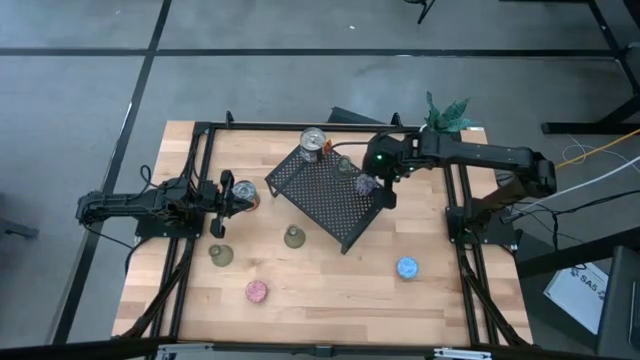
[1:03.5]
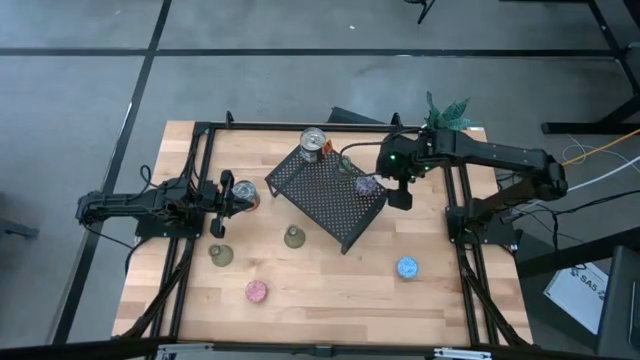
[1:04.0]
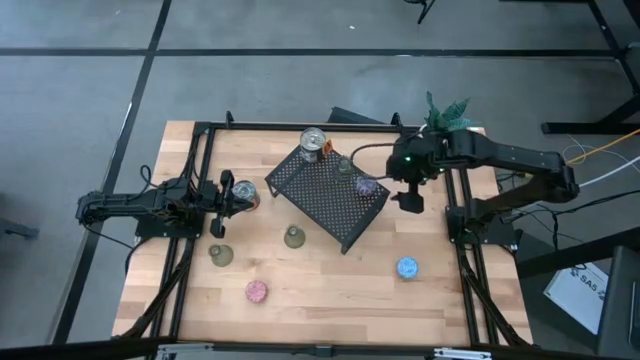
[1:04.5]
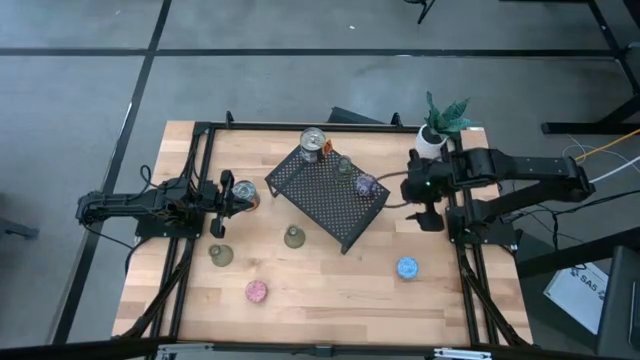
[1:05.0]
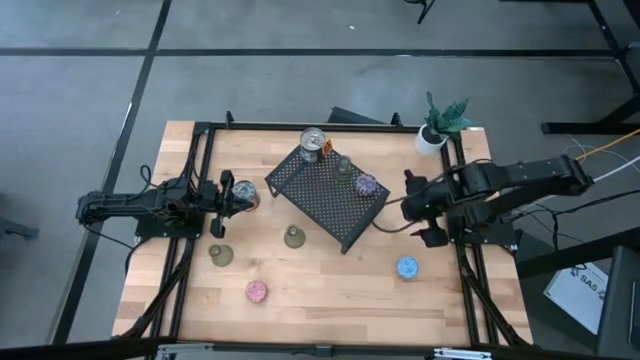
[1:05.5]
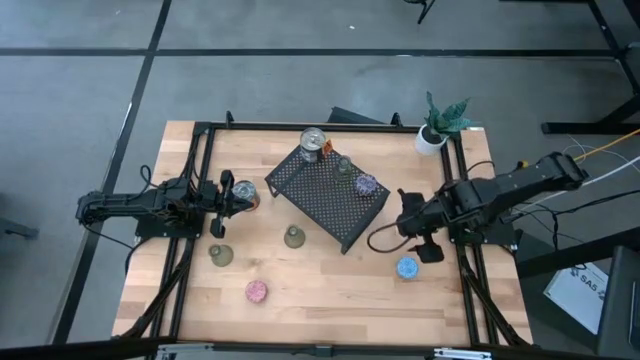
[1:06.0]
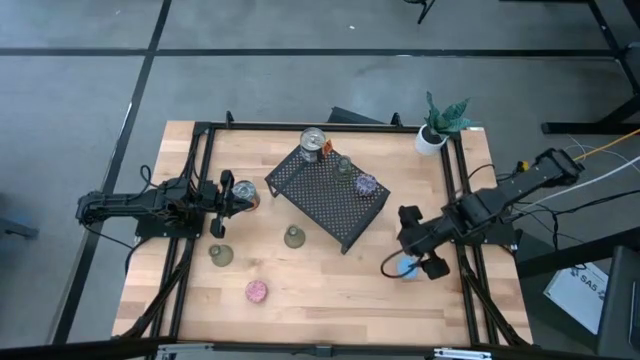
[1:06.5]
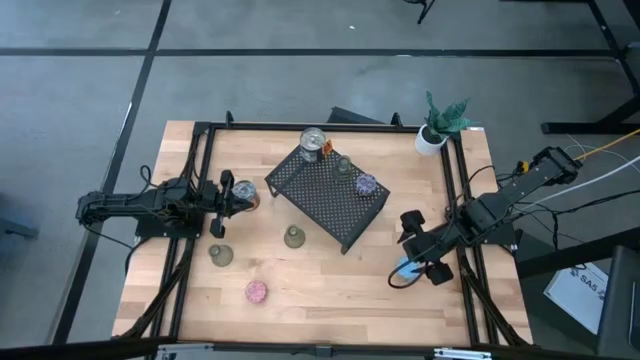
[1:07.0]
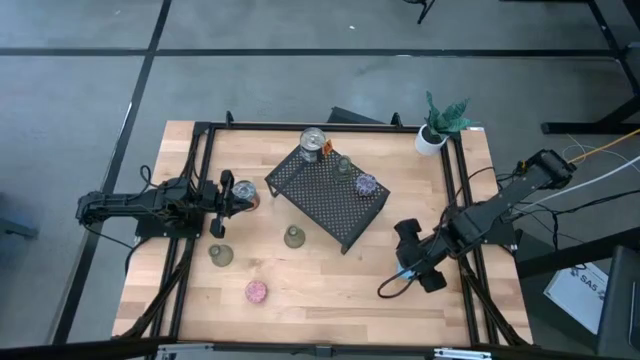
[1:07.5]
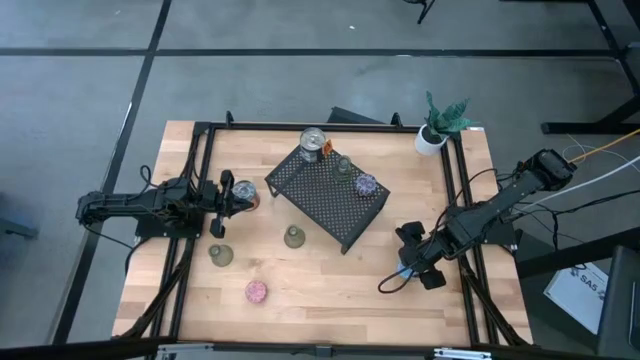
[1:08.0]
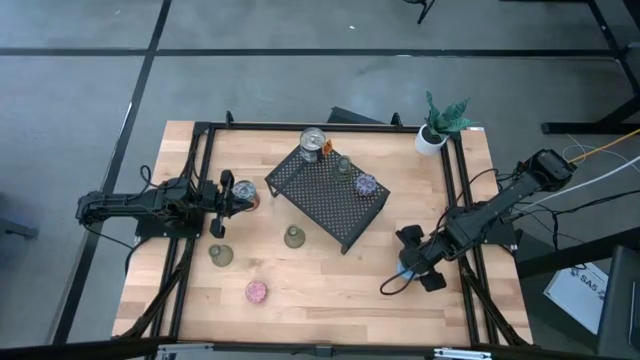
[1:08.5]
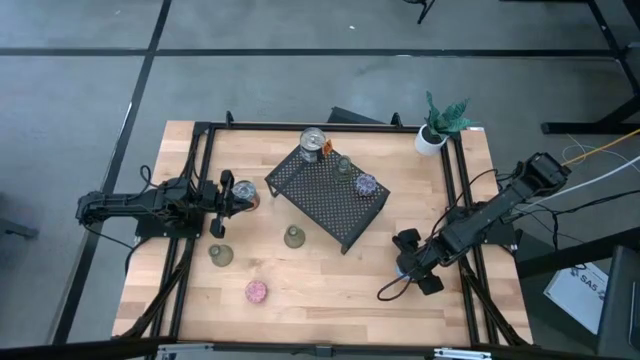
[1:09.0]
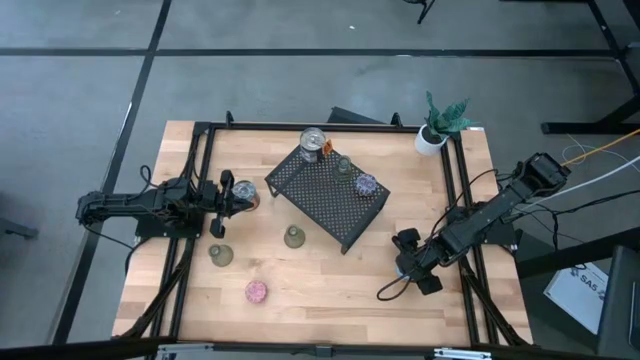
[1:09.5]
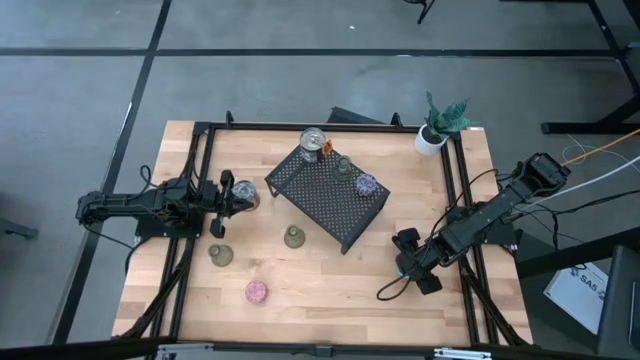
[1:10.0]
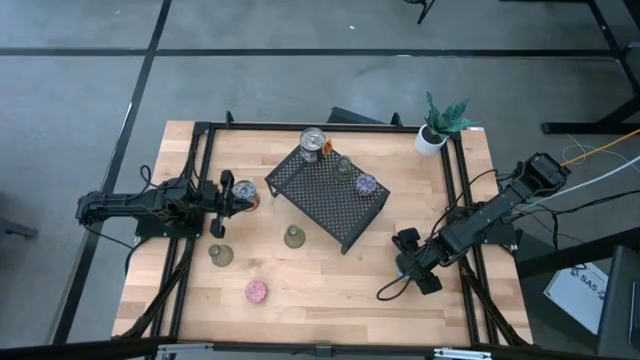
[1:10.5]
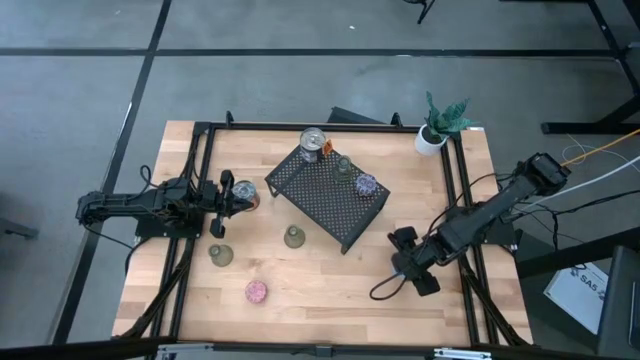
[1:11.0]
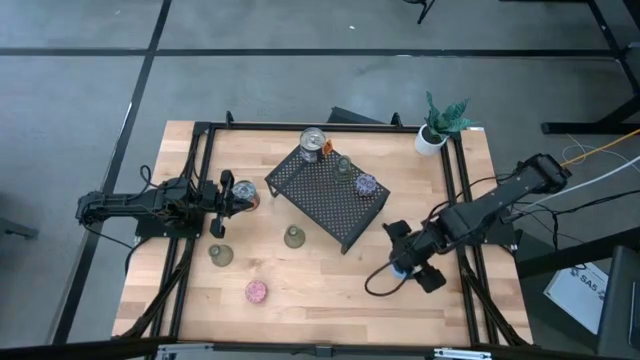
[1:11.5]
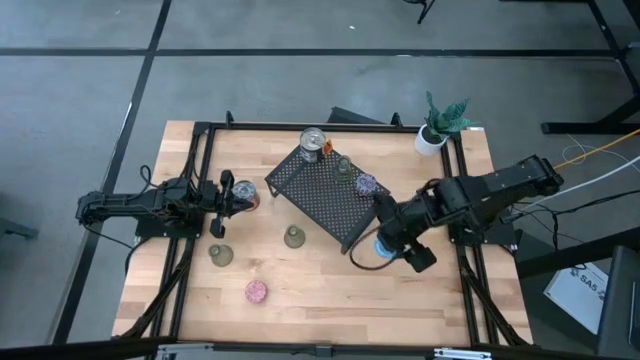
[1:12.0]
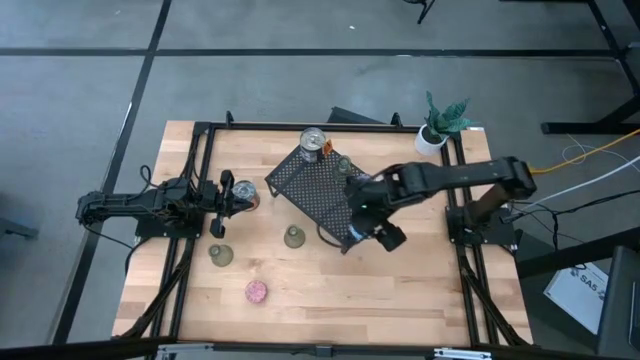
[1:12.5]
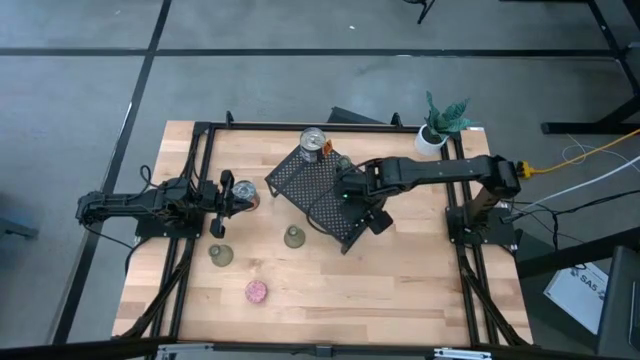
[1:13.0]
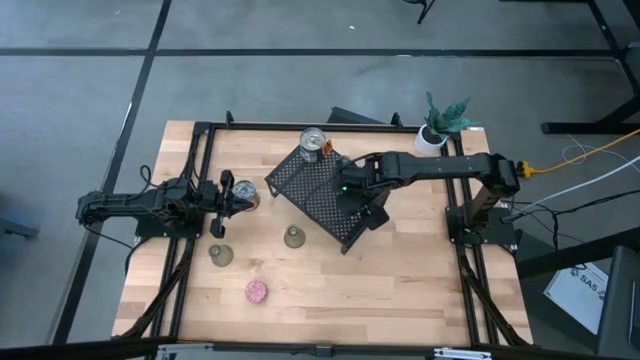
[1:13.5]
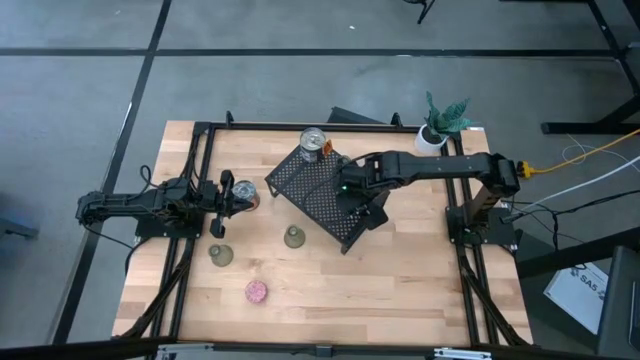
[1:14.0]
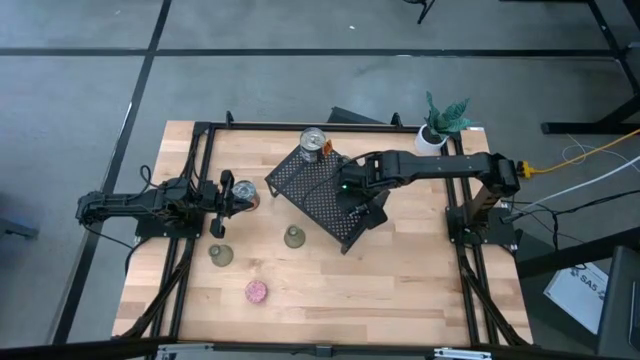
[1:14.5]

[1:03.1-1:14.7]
Task: Pick & Place candle stick holders
Put the blue scented candle on the shelf

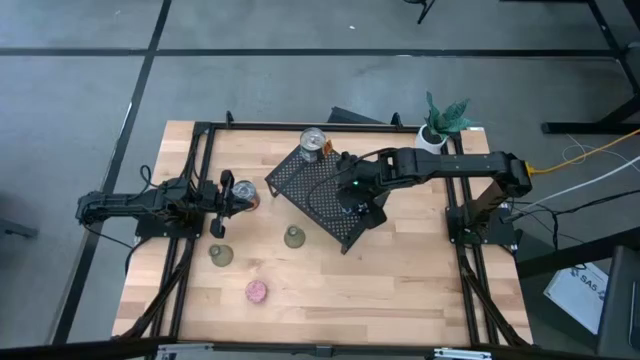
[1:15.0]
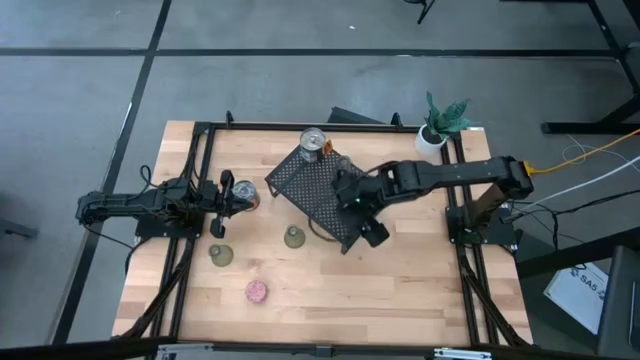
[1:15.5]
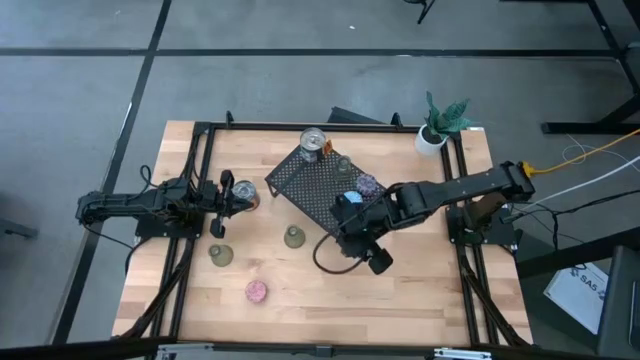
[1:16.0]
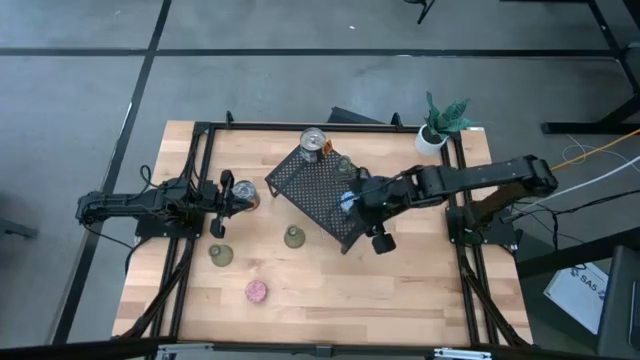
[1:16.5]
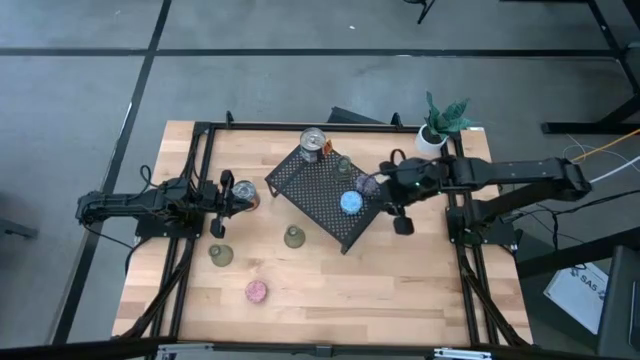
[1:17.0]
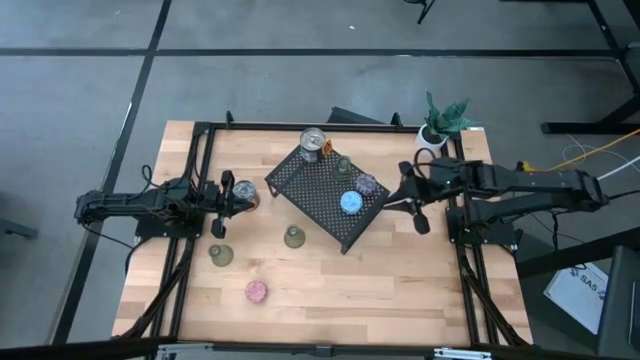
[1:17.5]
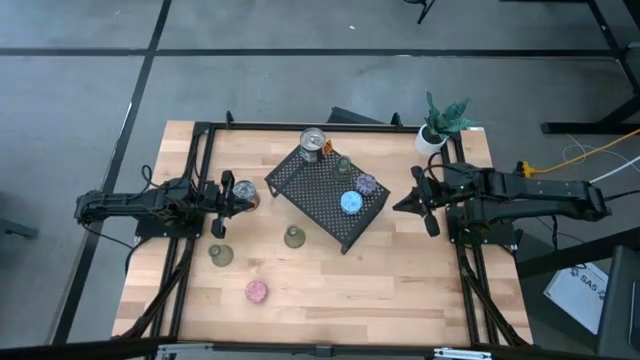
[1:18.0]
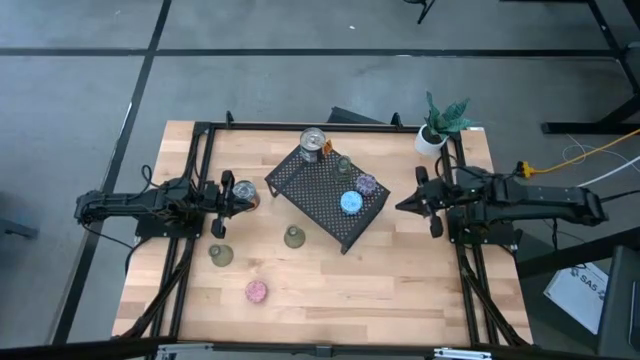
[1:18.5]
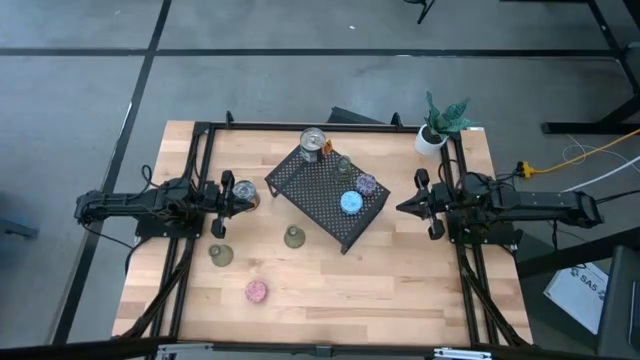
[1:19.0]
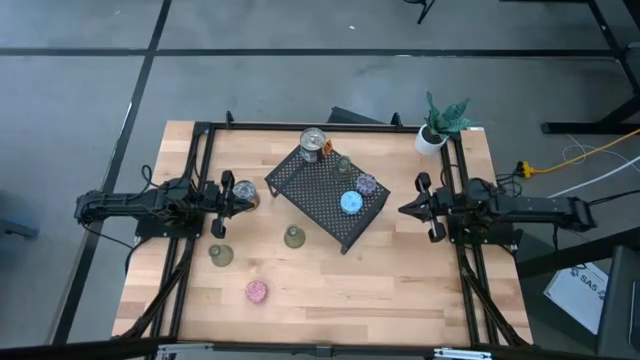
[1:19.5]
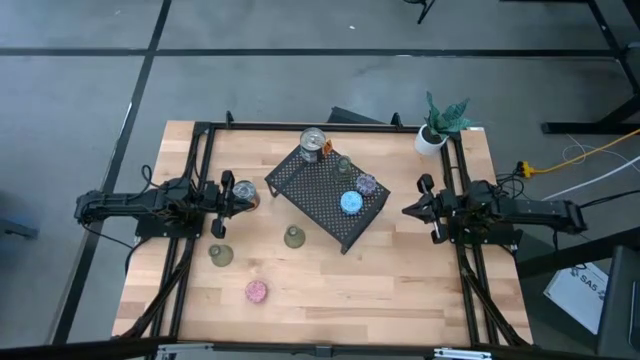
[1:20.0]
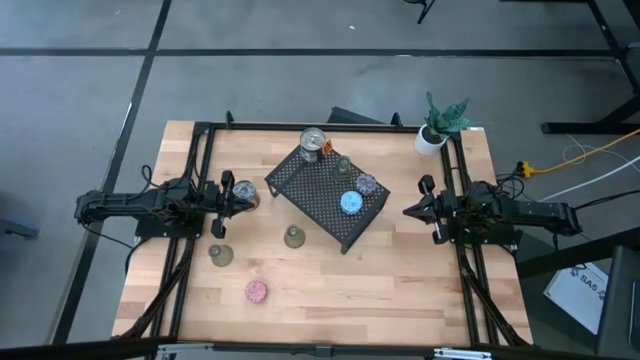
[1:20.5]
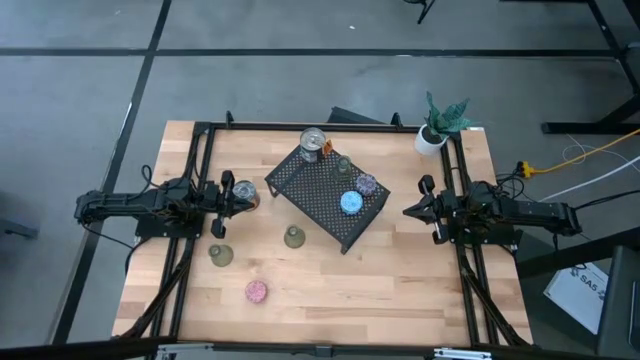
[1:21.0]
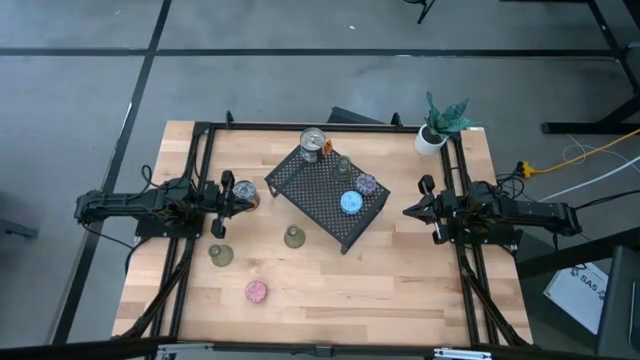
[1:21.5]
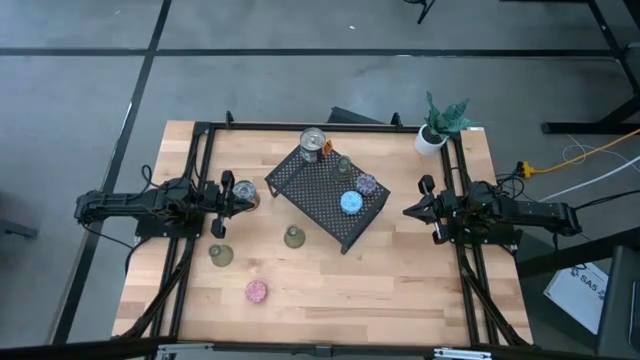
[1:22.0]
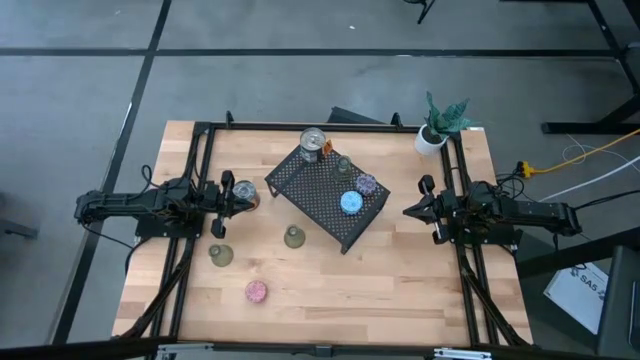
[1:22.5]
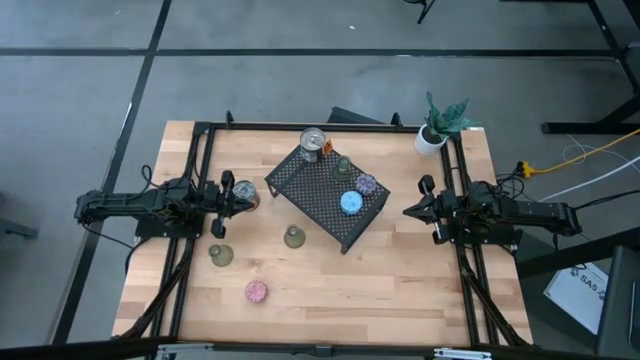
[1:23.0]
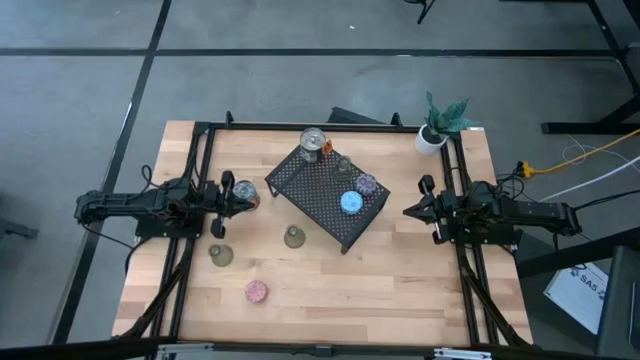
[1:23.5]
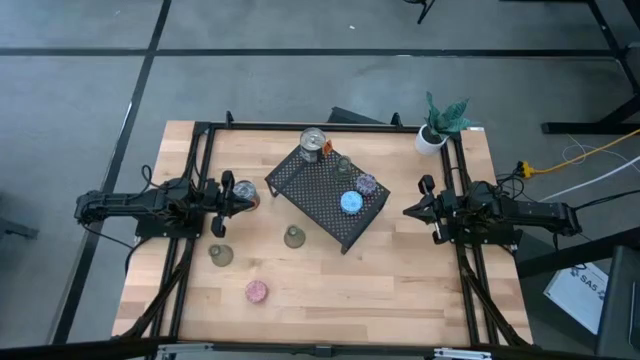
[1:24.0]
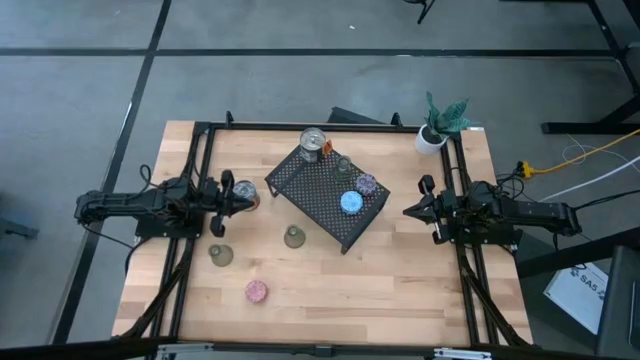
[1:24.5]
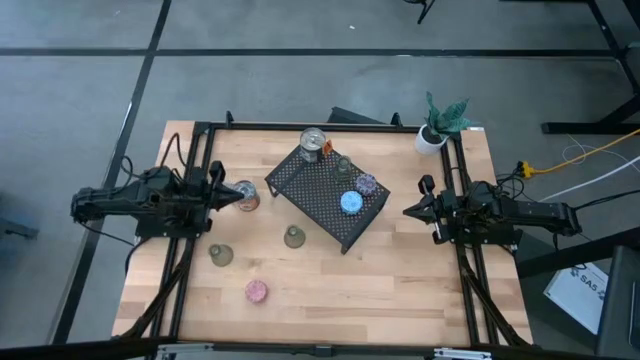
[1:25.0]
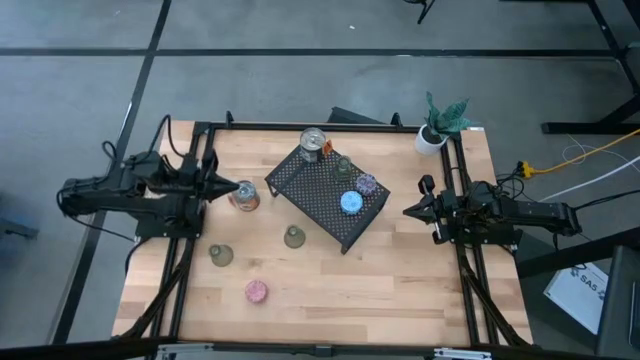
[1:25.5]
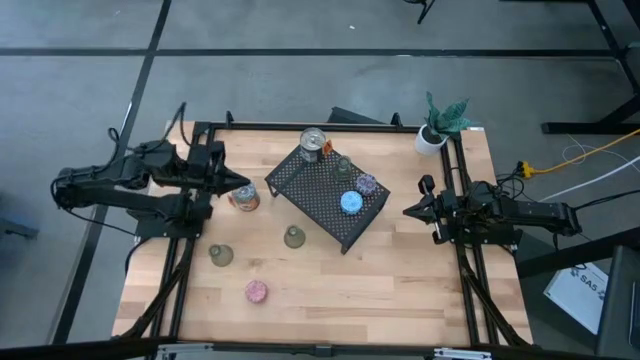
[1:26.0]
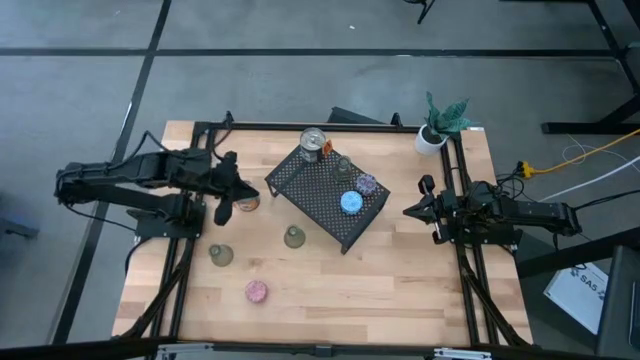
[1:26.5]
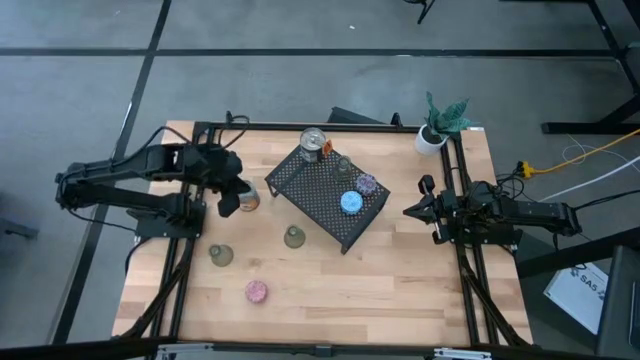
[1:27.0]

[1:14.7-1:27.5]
Put the brown scented candle on the shelf
